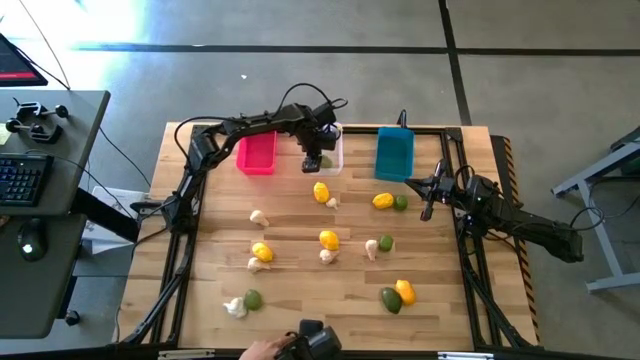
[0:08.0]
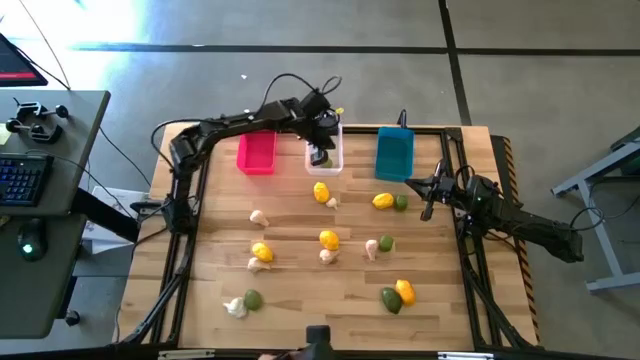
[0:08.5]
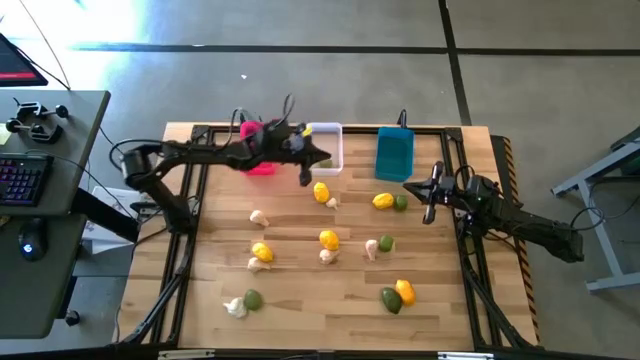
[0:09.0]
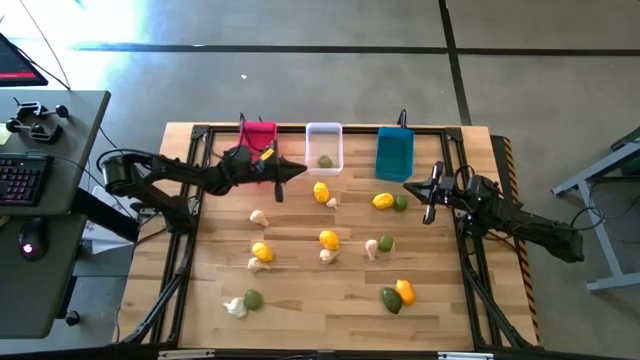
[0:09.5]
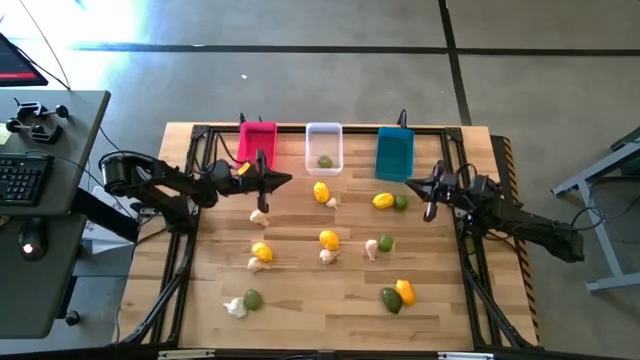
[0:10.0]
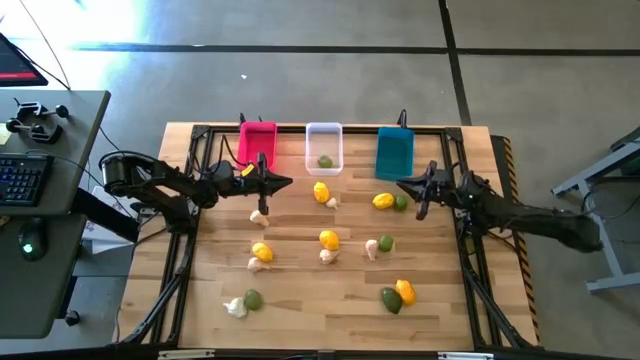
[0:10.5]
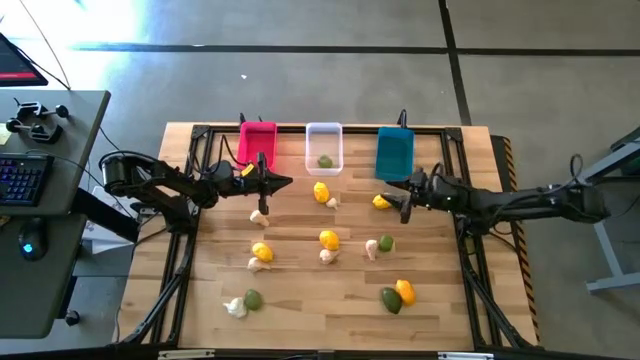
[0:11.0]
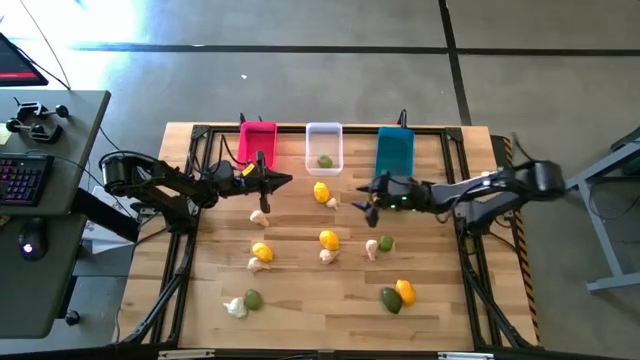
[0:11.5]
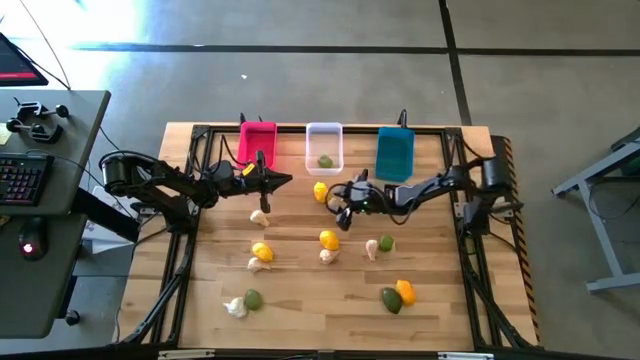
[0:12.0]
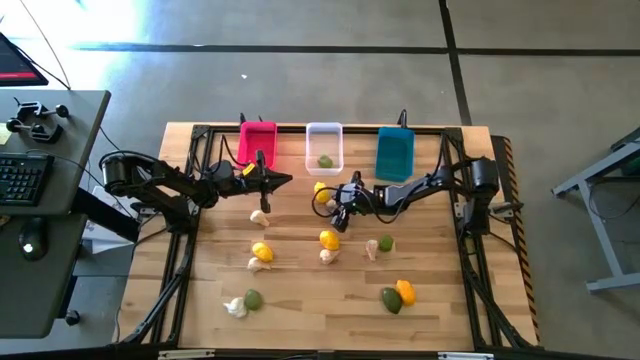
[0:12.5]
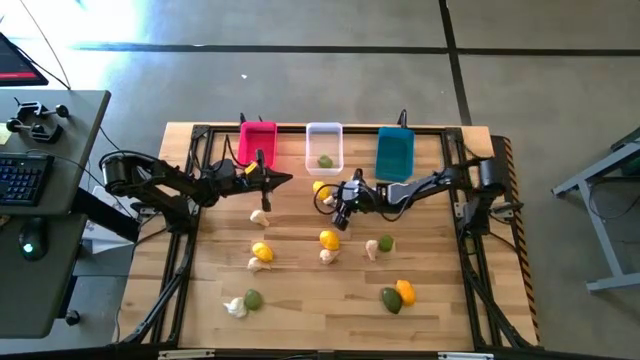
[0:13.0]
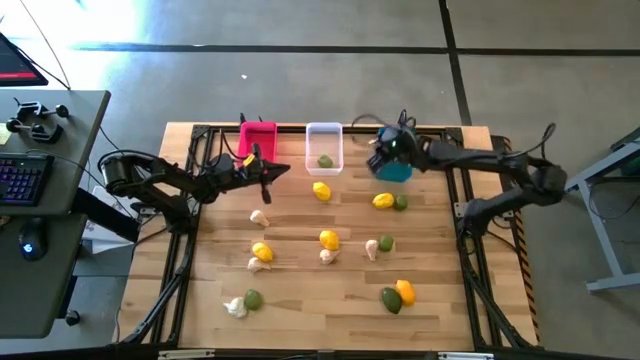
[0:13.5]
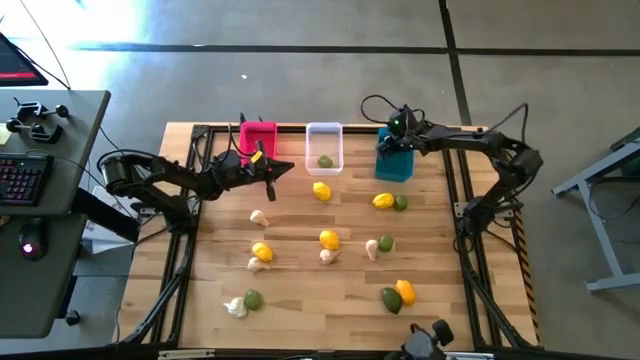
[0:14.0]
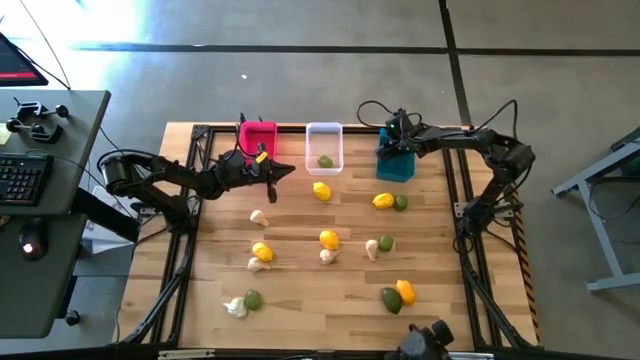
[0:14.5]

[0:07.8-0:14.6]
Task: Sort produce into baskets
Put the white garlic into the blue bin

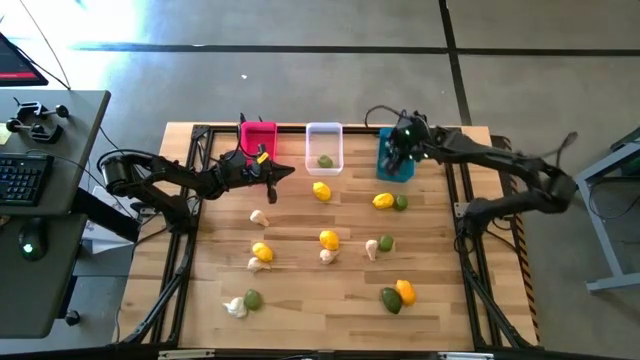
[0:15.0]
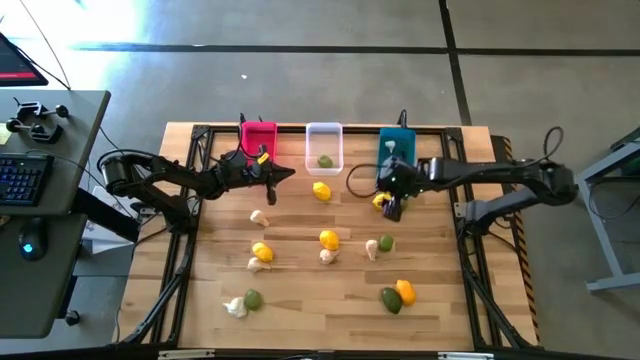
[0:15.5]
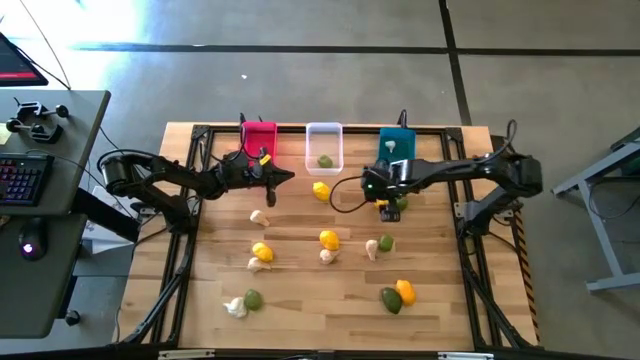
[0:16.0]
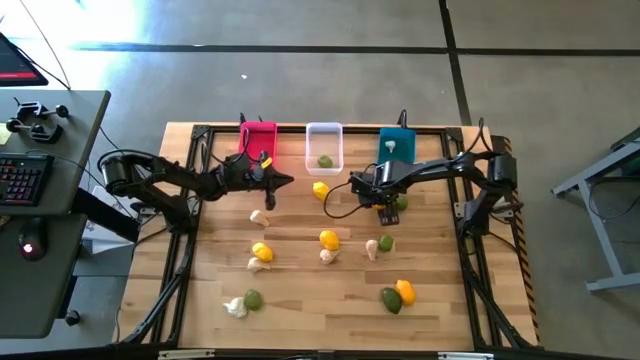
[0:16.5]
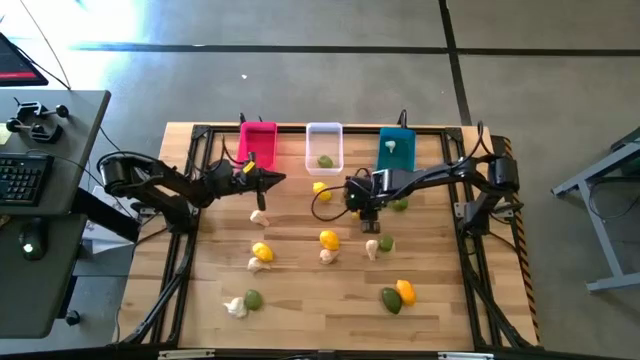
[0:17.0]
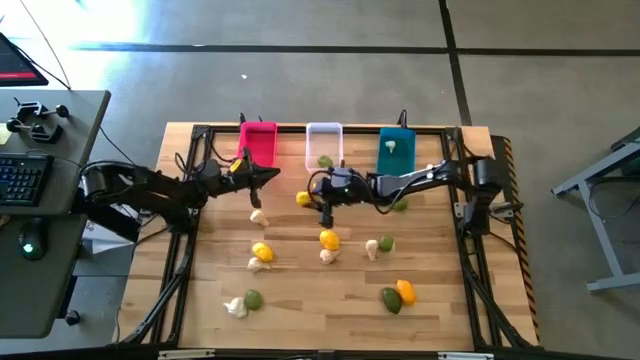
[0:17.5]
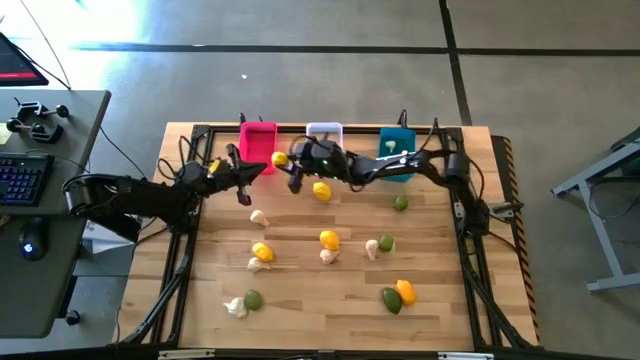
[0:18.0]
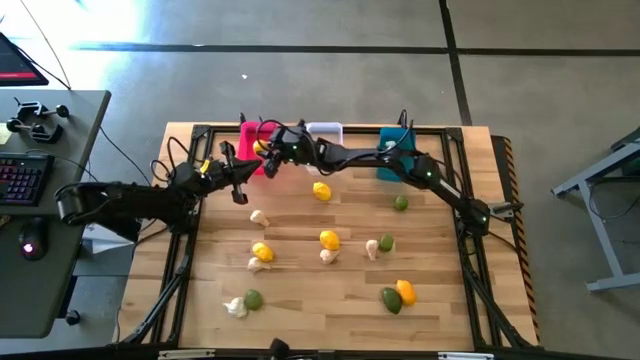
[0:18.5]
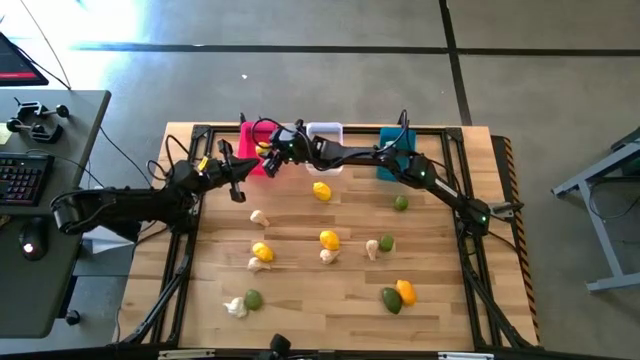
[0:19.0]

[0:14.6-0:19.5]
Put the lemon into the pink bin

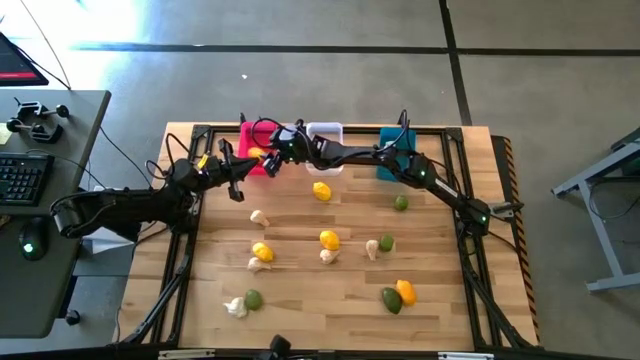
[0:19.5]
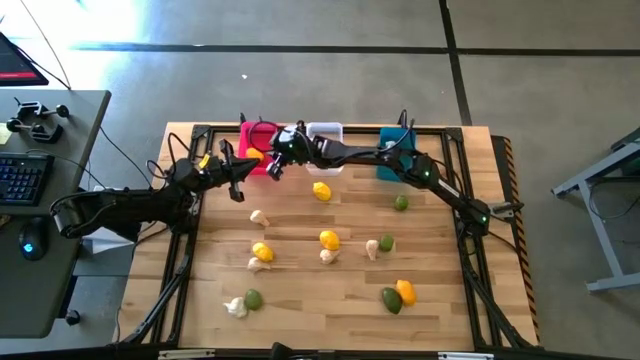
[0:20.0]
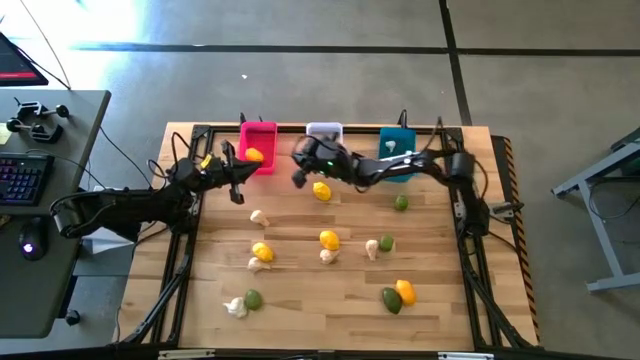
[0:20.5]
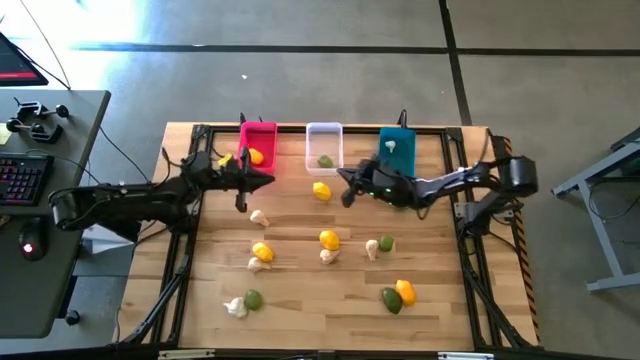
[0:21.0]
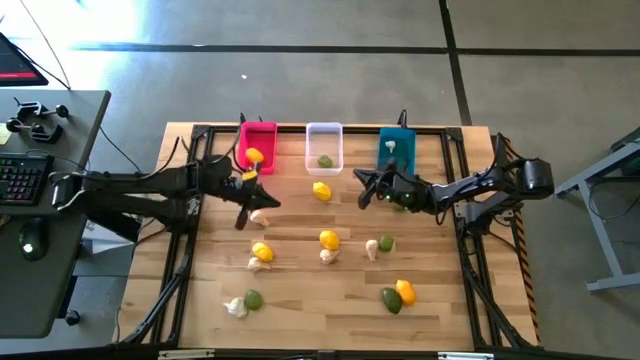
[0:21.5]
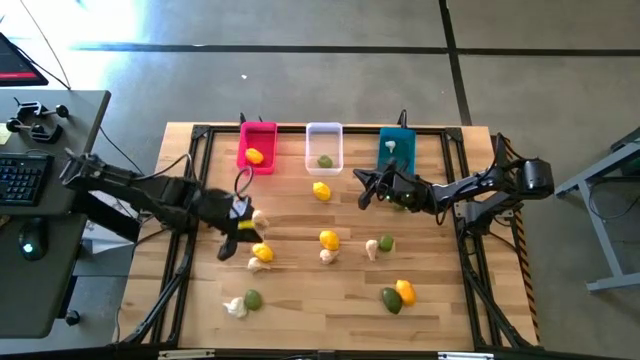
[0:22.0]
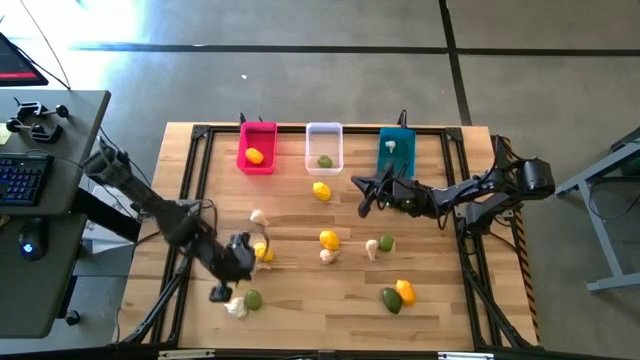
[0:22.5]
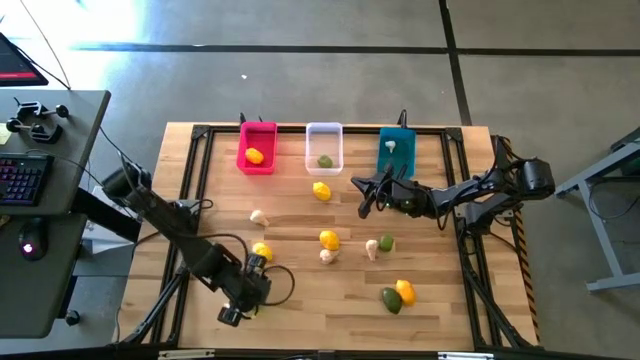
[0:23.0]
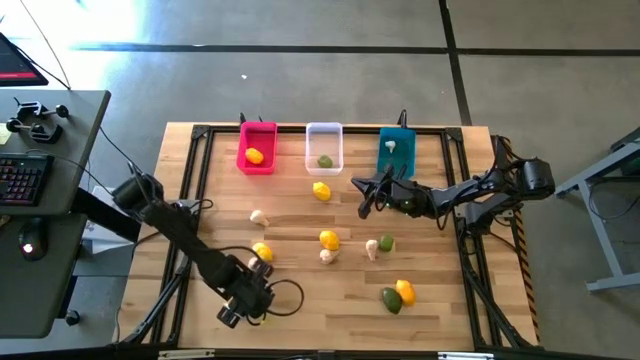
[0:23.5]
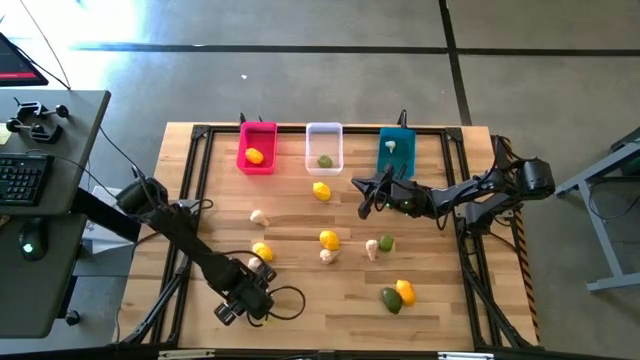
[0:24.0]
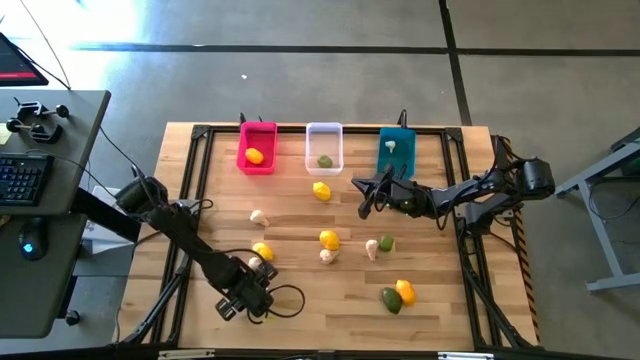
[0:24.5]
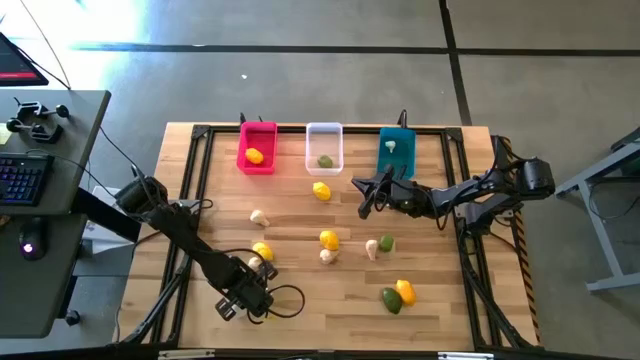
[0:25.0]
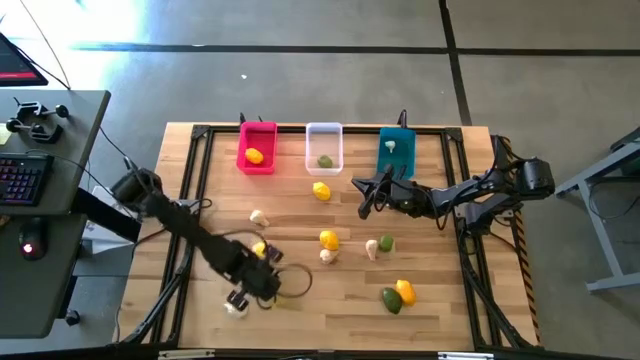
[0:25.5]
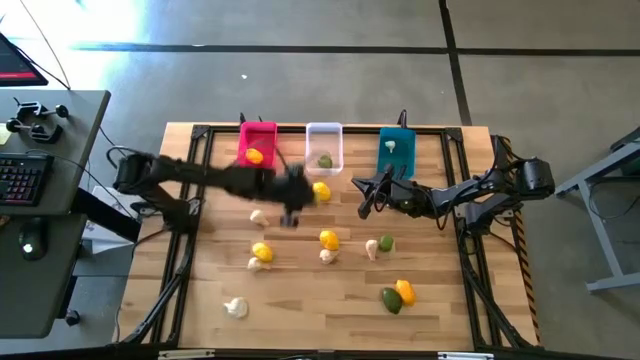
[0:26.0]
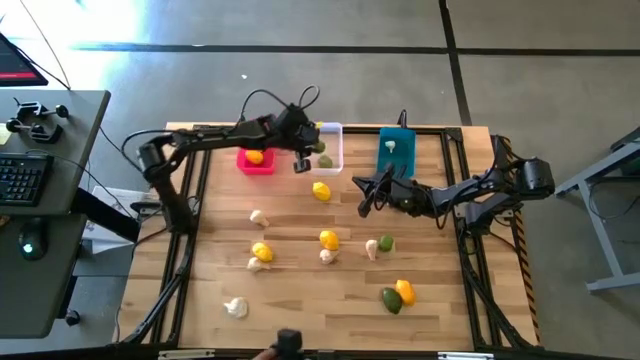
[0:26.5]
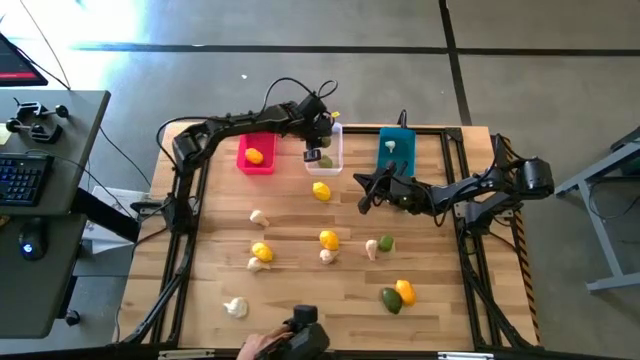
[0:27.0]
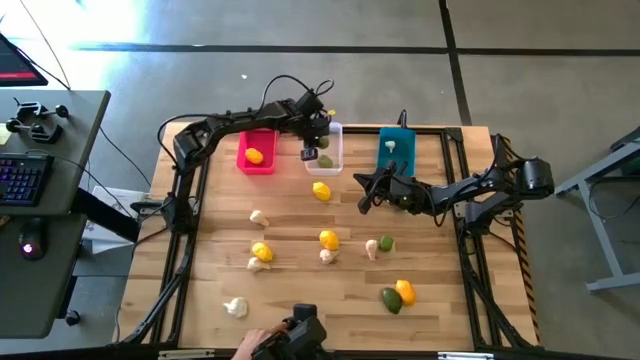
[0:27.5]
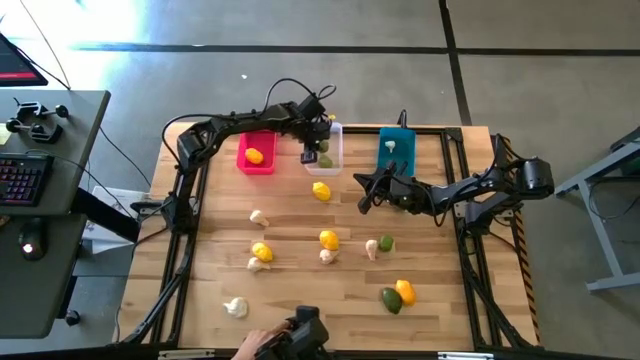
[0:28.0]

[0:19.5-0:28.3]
Put the lime into the transparent bin

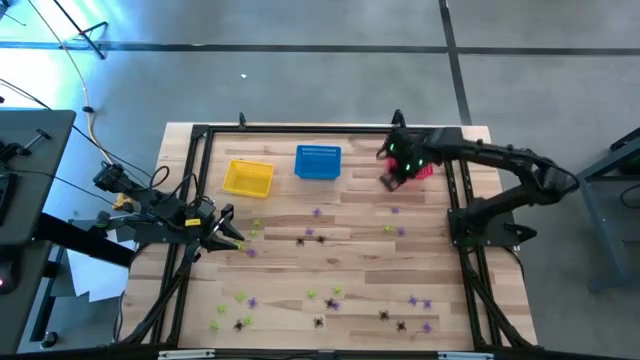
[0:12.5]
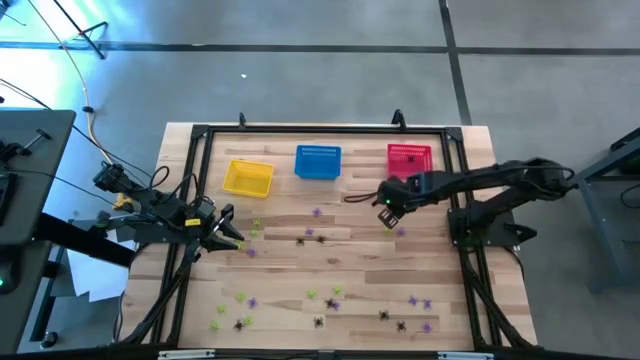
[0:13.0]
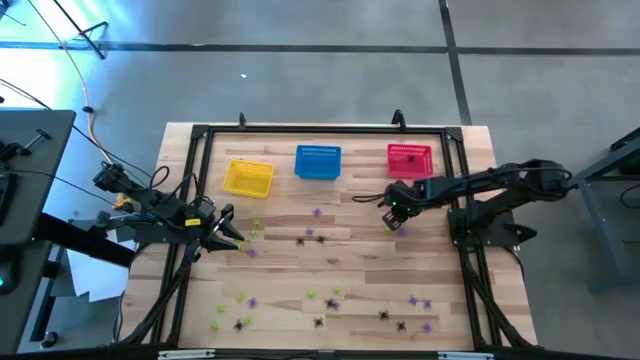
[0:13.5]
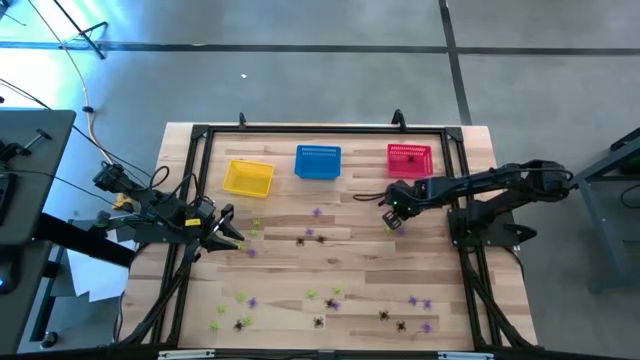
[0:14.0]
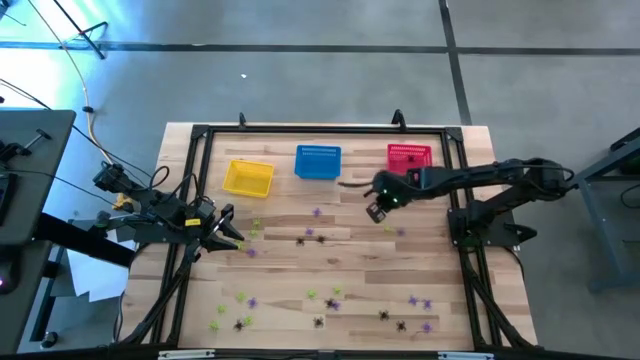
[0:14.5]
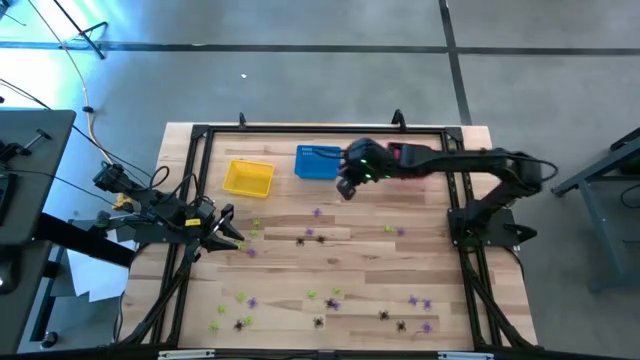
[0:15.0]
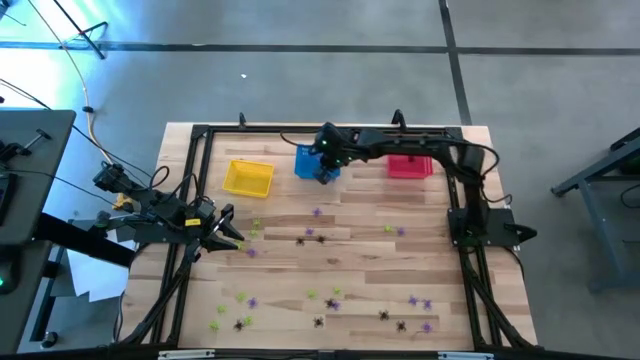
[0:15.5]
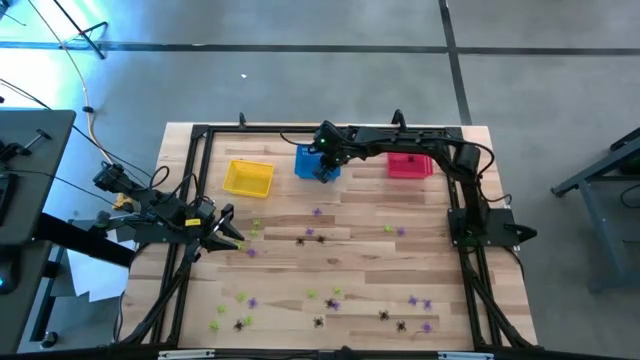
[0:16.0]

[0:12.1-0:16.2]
Task: Sort Halloween decoration
Put the purple spider toy into the blue bin
